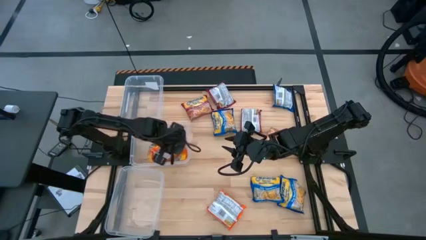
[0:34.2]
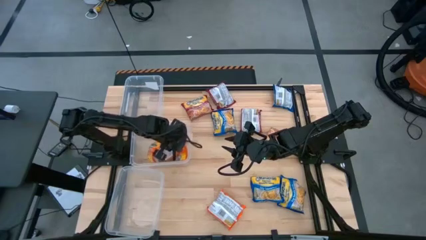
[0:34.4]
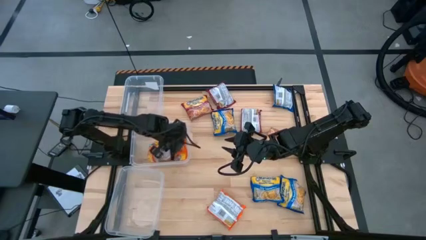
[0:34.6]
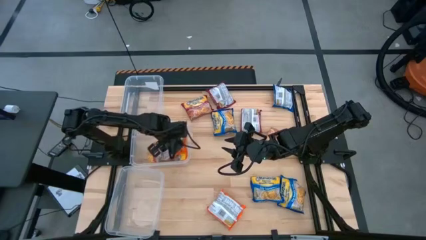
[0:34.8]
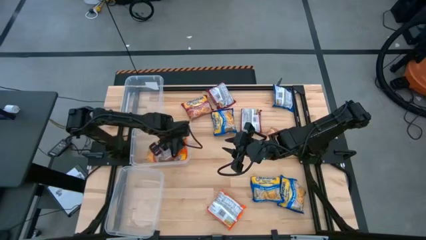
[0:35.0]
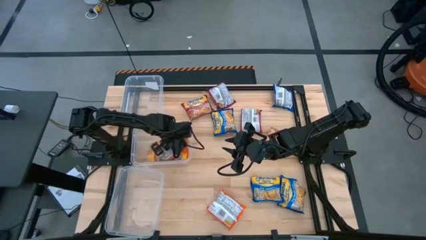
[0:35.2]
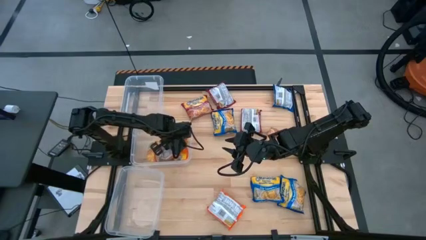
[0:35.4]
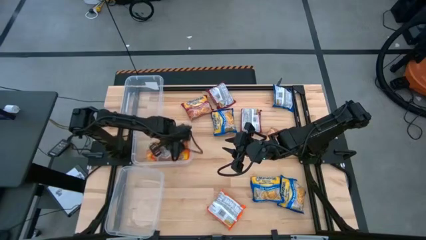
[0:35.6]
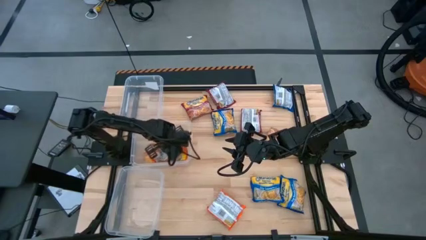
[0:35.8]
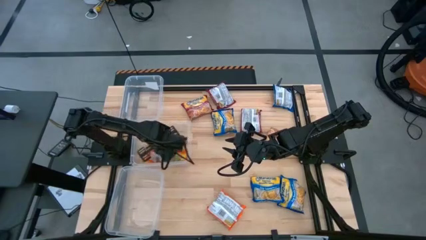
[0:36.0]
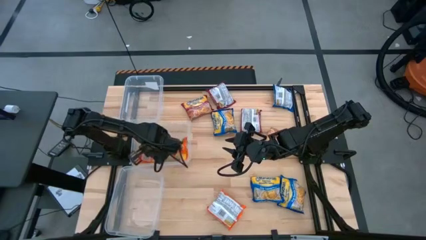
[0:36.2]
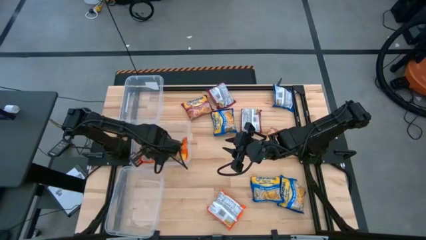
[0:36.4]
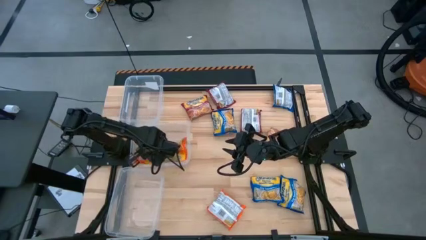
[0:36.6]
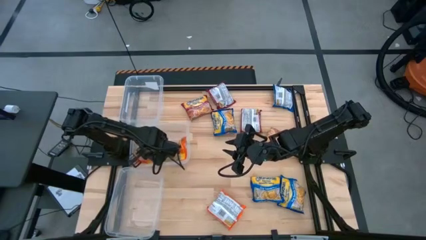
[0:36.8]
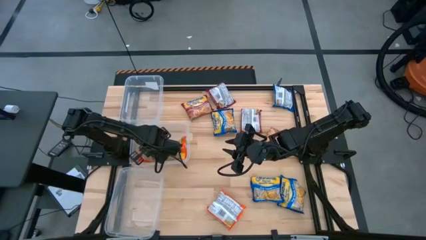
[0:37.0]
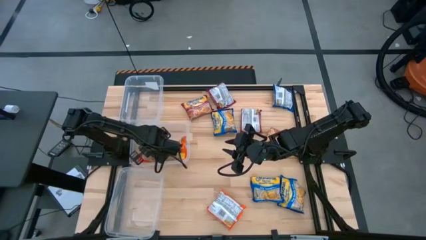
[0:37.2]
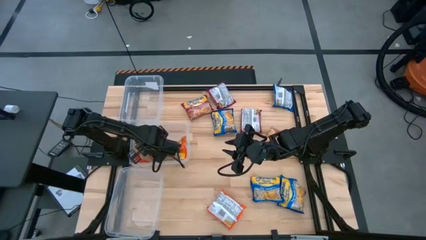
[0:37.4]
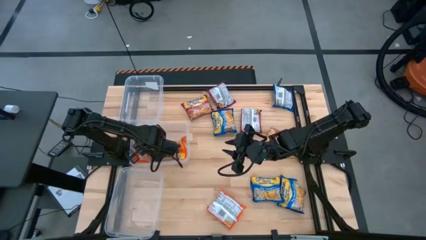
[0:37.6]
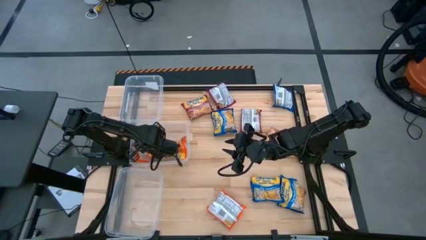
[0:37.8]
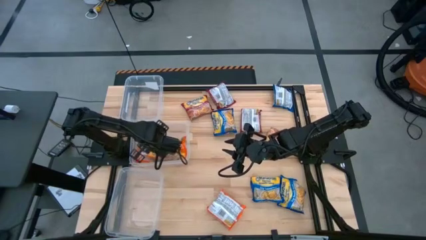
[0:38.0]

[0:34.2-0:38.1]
Task: Sort Maruchan noodles
Adjust the orange noodle pack

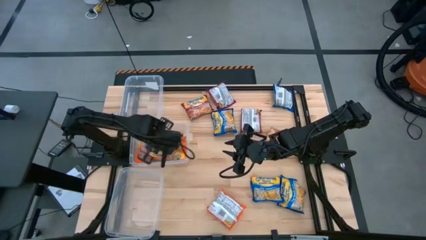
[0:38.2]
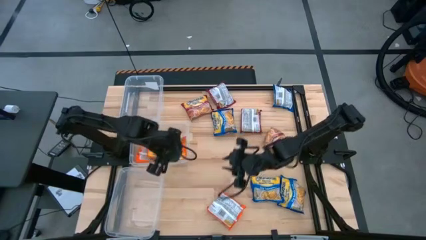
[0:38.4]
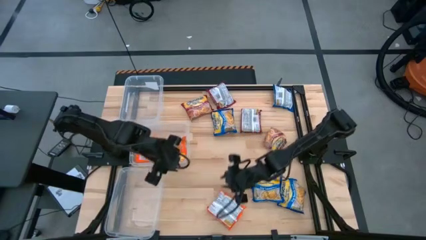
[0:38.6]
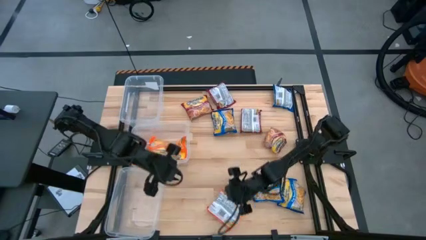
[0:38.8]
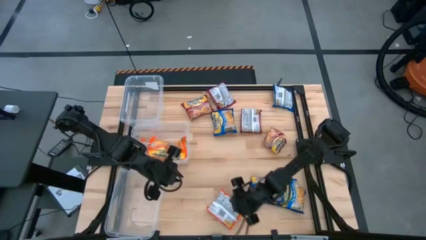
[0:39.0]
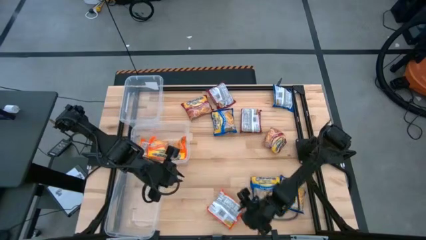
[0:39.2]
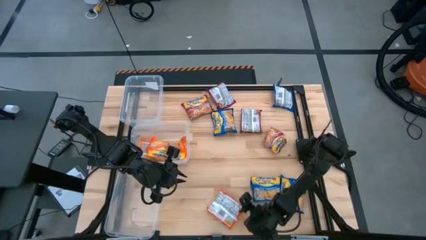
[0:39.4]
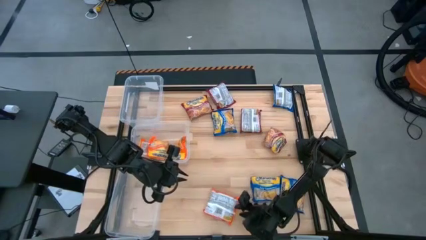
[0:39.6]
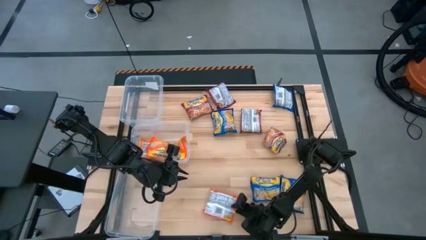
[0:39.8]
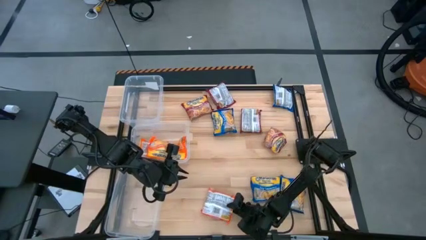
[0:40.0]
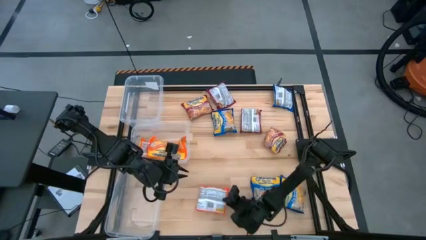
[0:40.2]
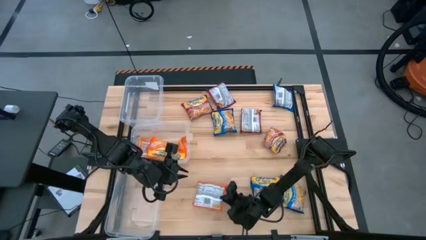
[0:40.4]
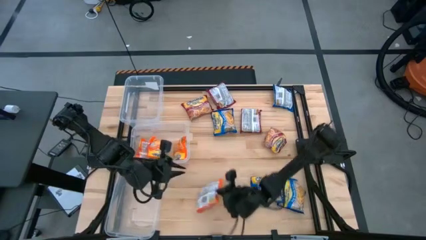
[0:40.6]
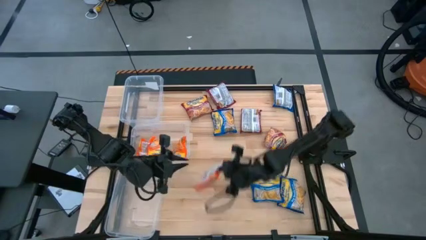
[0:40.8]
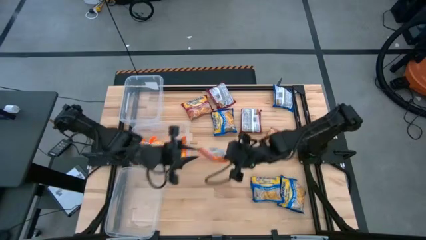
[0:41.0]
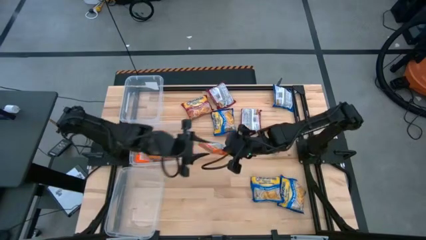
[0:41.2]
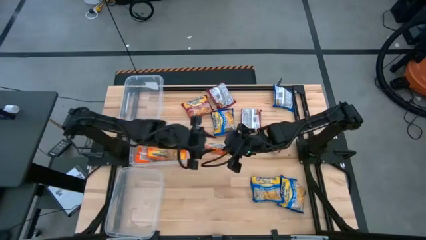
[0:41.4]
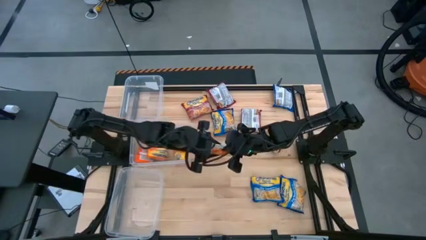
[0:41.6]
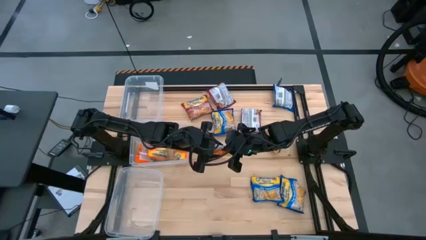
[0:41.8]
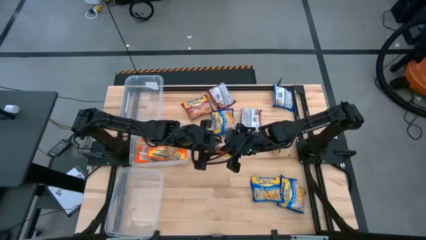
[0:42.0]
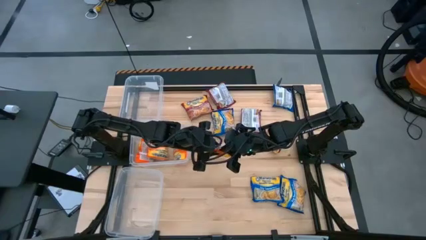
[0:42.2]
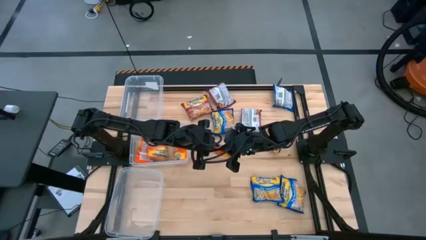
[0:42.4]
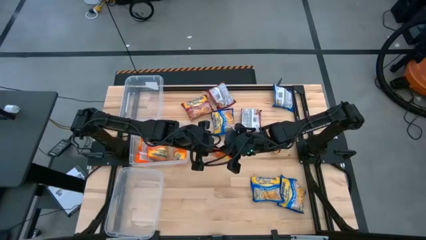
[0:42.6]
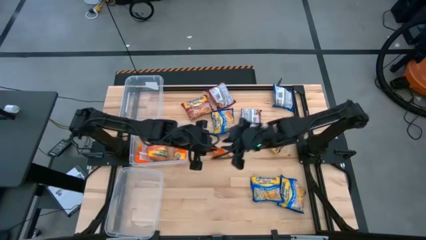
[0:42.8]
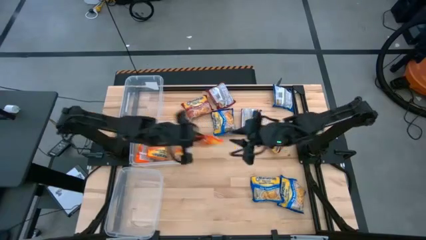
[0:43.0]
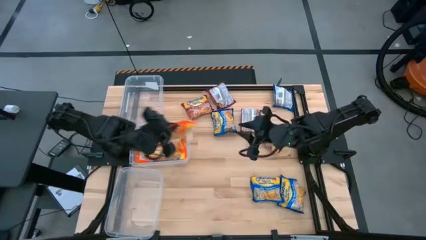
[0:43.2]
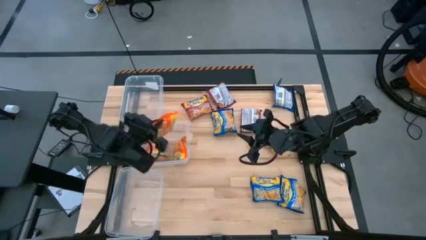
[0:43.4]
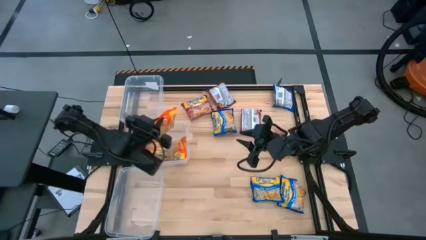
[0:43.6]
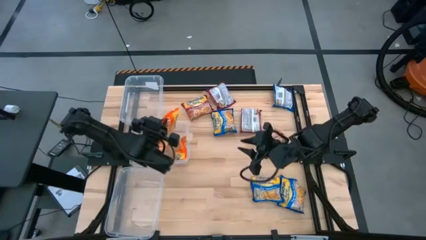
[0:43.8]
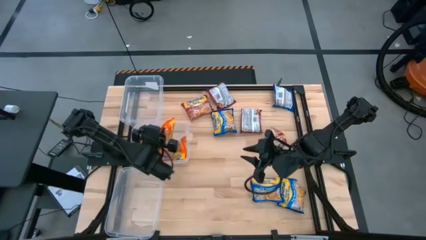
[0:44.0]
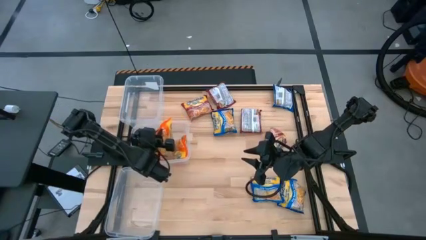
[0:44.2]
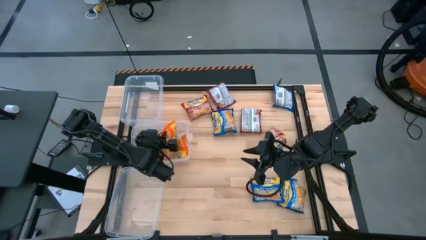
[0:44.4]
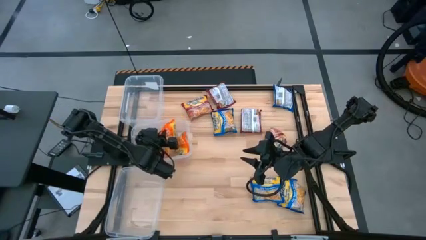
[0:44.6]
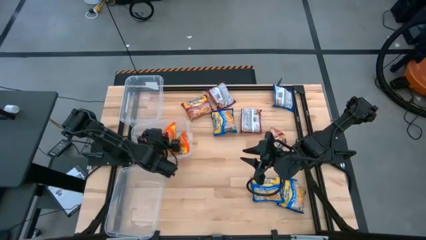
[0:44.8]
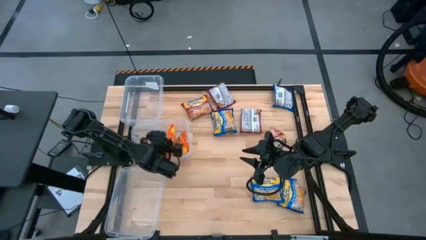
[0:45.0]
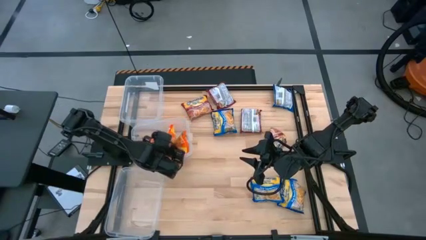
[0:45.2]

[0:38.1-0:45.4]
Put the orange noodle pack into the middle transparent bin

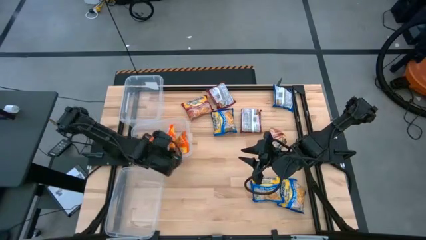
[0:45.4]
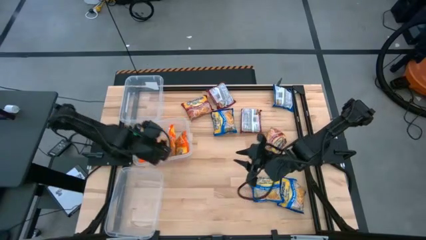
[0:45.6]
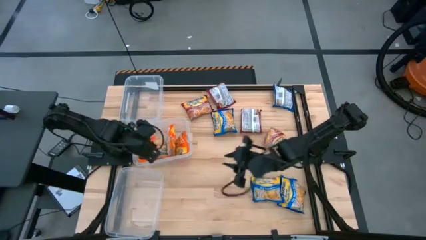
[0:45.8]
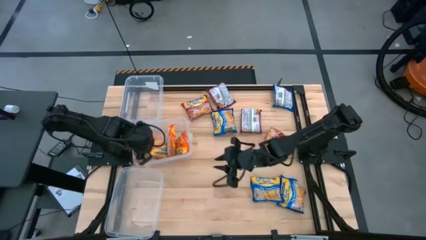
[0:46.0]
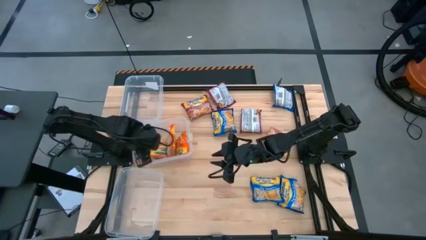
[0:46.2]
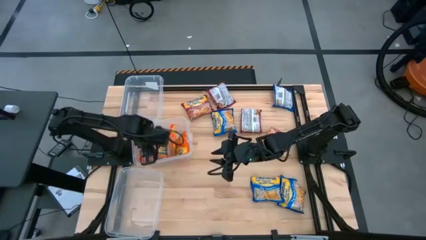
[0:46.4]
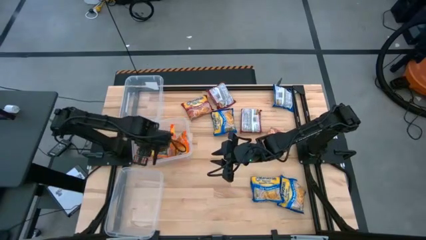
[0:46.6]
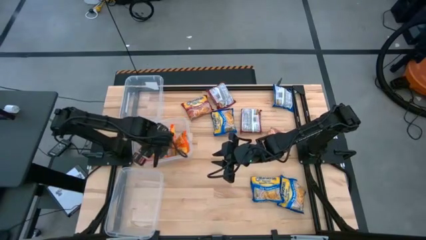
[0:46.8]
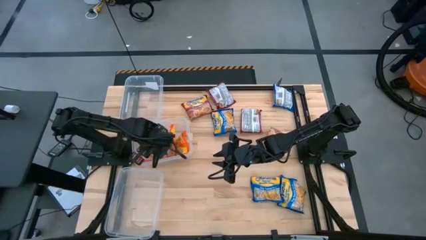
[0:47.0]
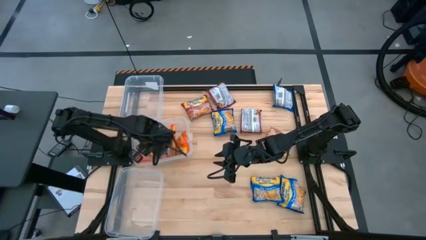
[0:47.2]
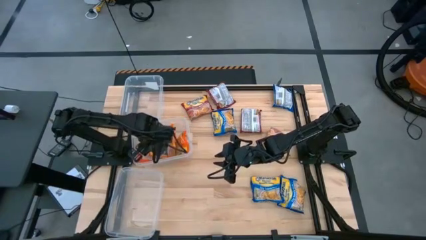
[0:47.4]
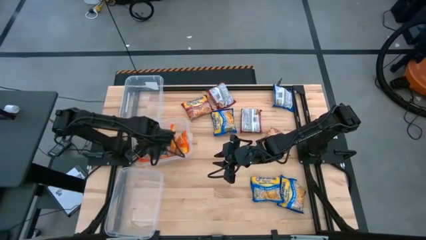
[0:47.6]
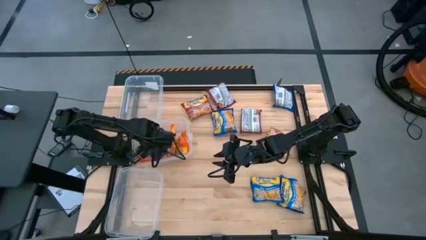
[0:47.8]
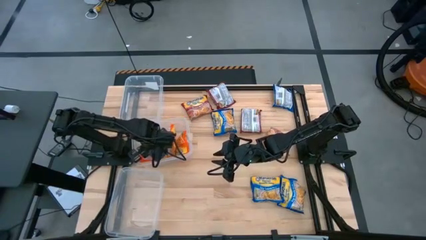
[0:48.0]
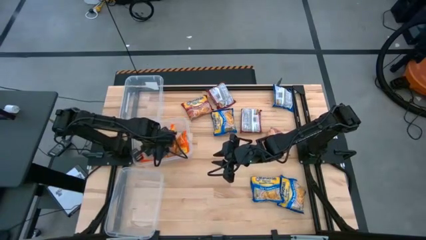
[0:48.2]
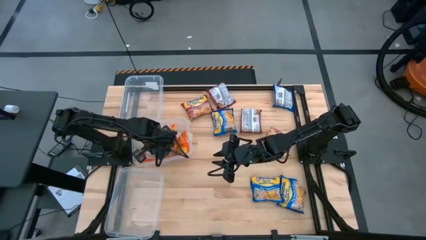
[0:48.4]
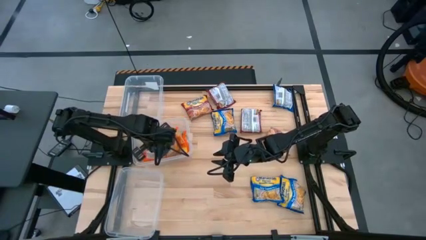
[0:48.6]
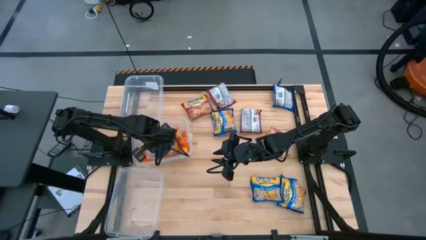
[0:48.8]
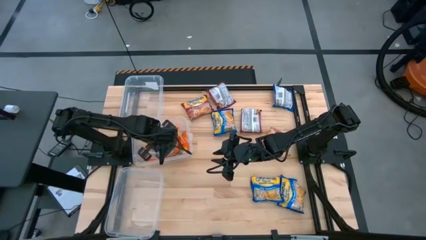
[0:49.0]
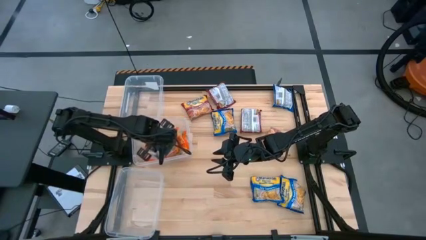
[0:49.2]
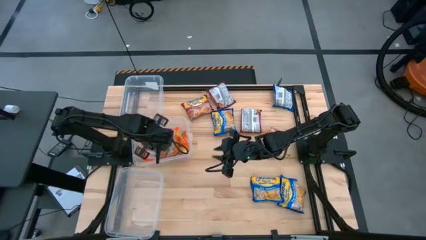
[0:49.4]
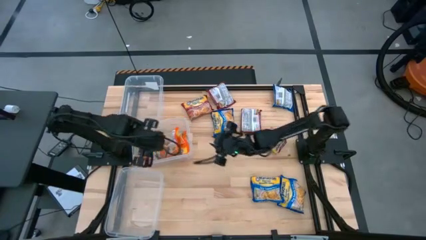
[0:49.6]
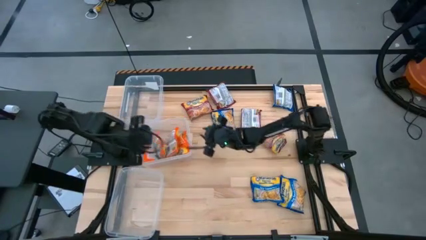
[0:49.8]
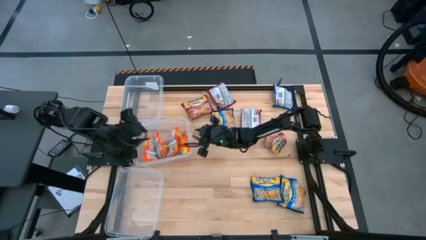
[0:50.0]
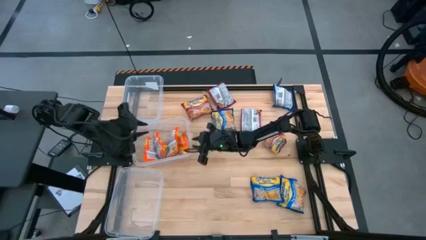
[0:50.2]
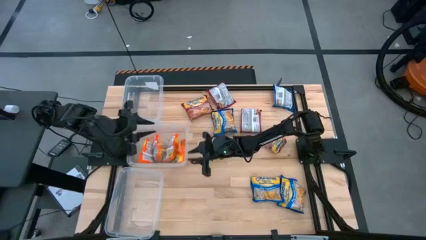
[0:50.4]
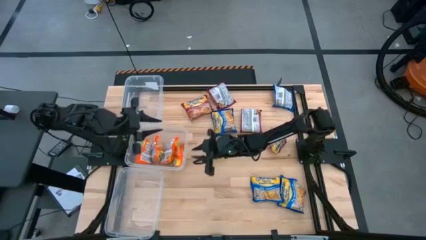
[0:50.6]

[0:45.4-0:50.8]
Adjust the orange noodle pack
